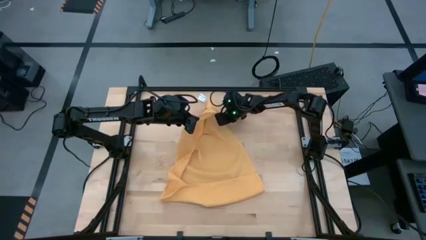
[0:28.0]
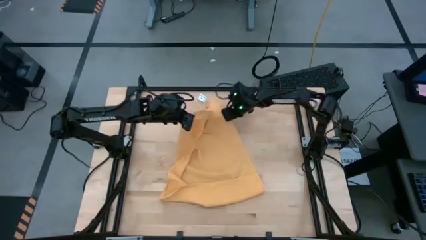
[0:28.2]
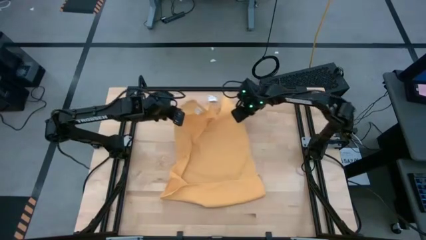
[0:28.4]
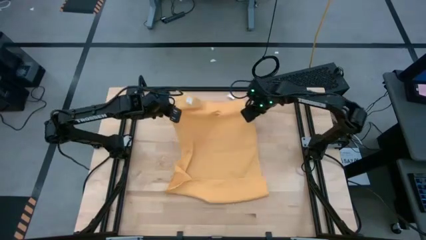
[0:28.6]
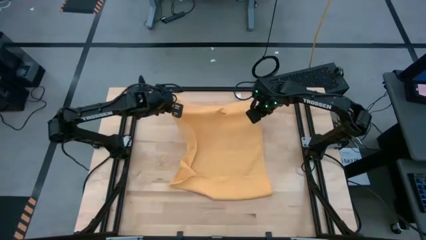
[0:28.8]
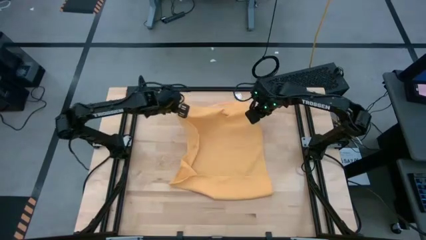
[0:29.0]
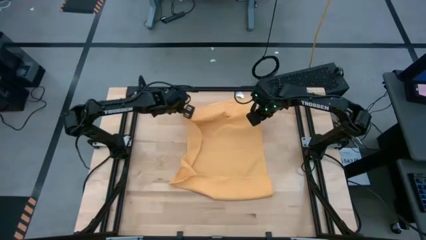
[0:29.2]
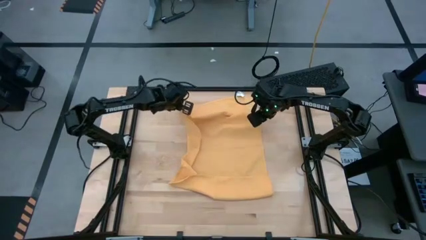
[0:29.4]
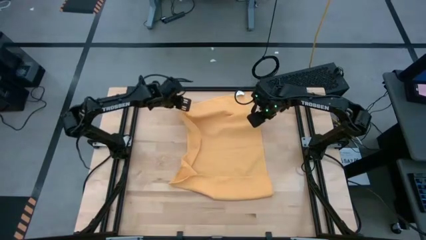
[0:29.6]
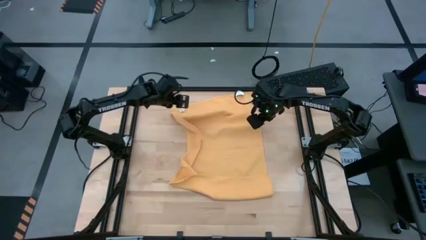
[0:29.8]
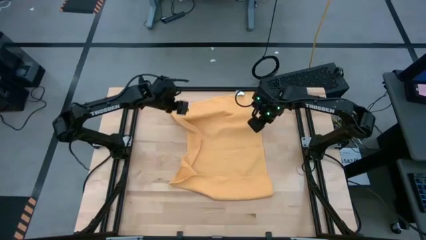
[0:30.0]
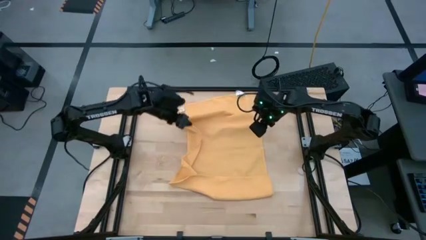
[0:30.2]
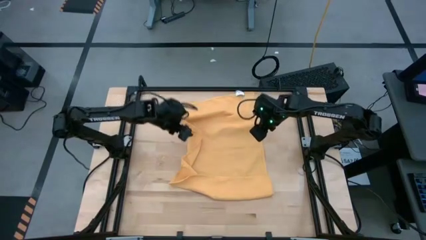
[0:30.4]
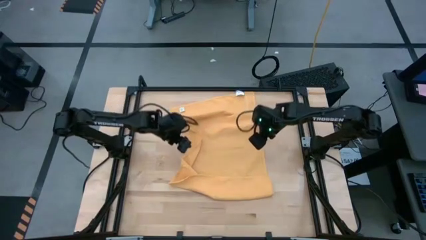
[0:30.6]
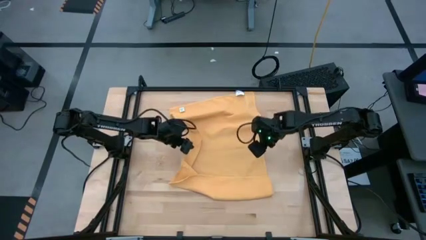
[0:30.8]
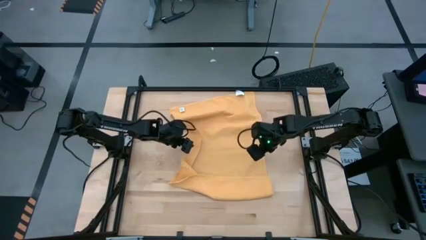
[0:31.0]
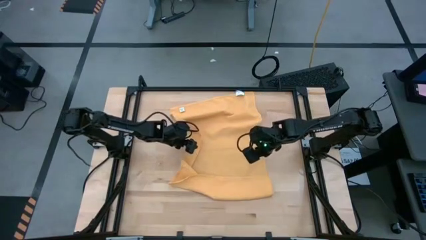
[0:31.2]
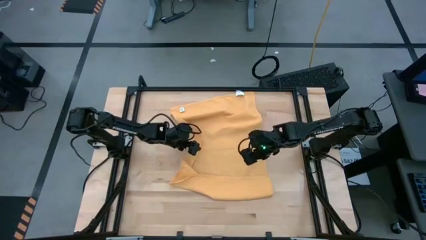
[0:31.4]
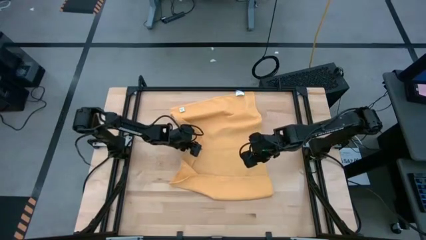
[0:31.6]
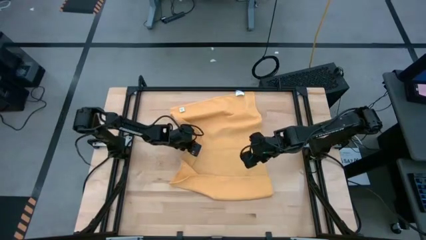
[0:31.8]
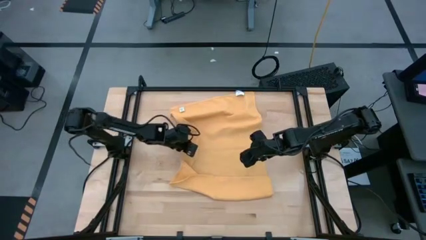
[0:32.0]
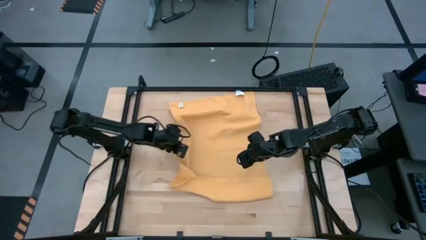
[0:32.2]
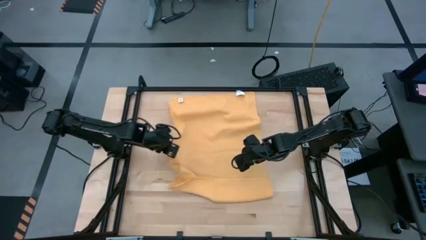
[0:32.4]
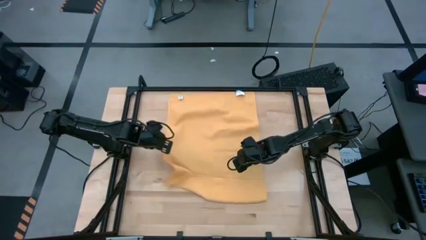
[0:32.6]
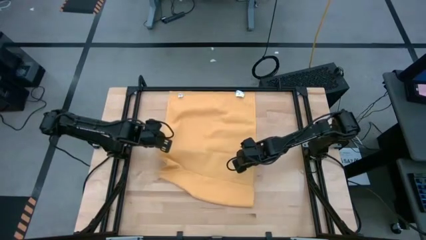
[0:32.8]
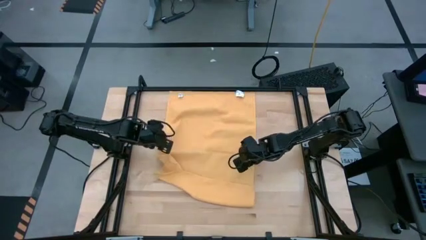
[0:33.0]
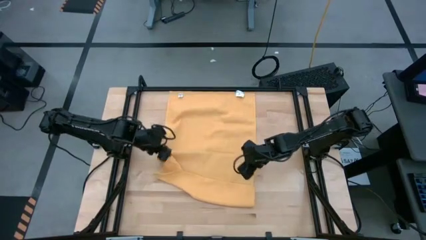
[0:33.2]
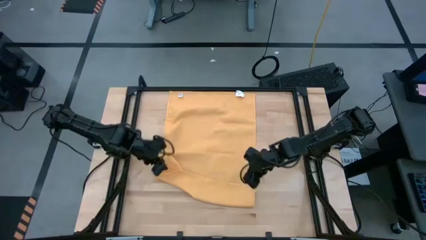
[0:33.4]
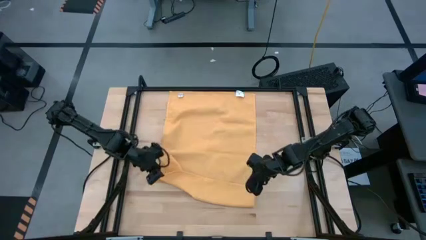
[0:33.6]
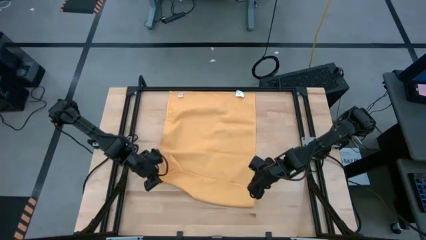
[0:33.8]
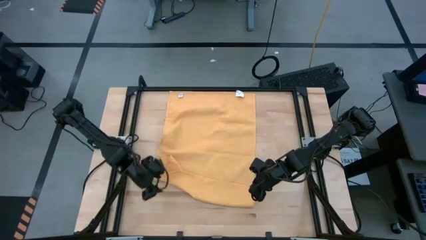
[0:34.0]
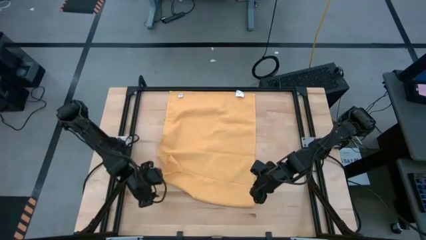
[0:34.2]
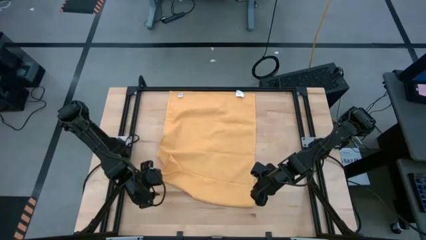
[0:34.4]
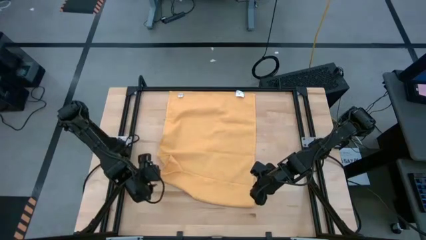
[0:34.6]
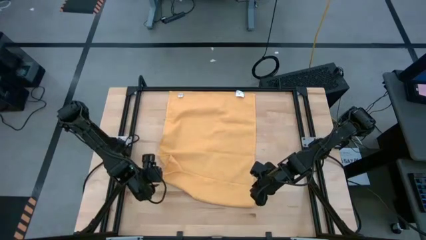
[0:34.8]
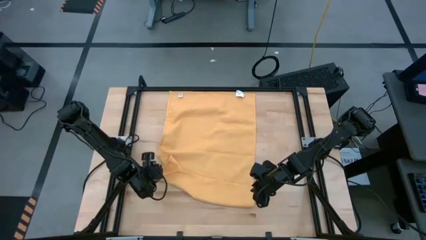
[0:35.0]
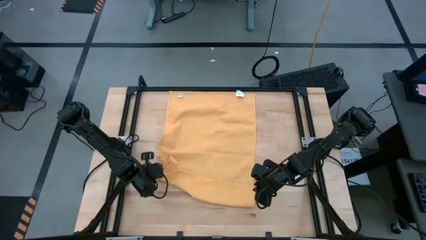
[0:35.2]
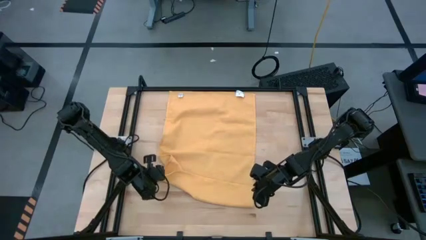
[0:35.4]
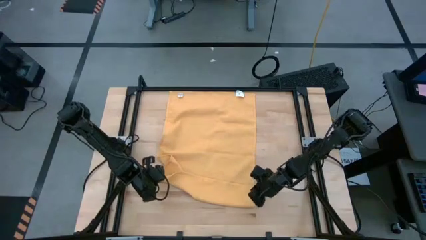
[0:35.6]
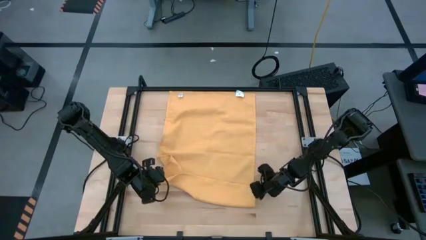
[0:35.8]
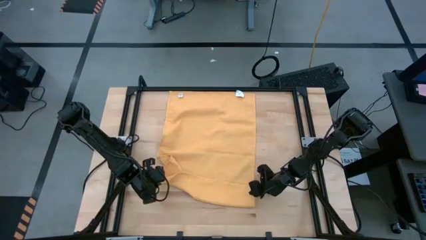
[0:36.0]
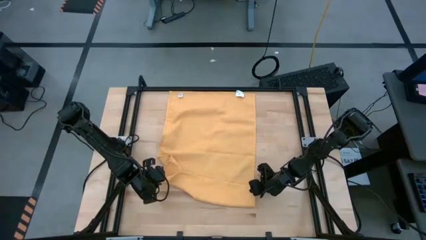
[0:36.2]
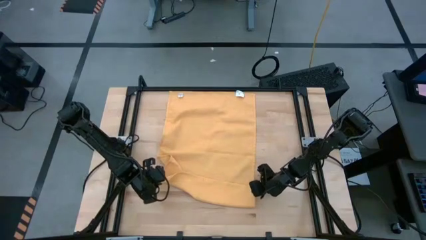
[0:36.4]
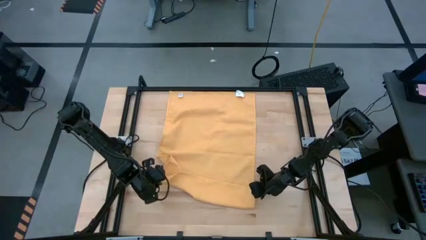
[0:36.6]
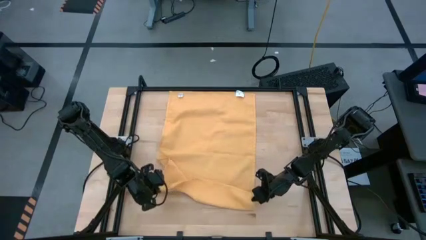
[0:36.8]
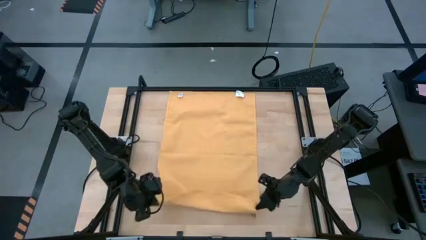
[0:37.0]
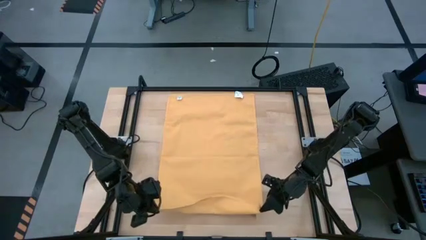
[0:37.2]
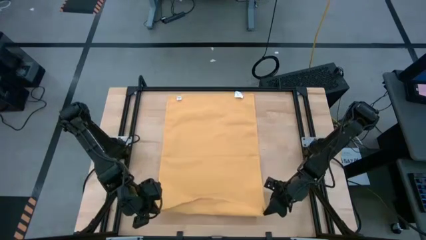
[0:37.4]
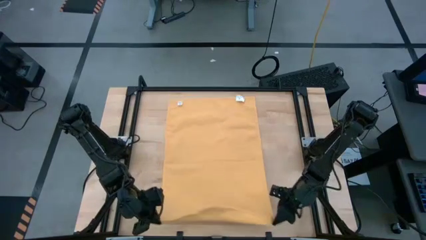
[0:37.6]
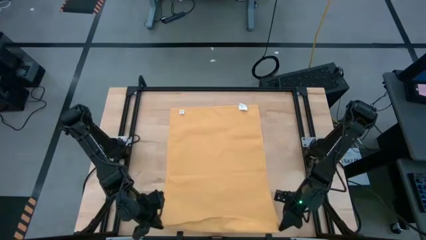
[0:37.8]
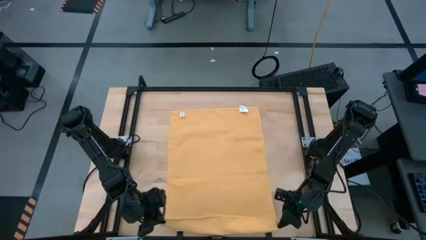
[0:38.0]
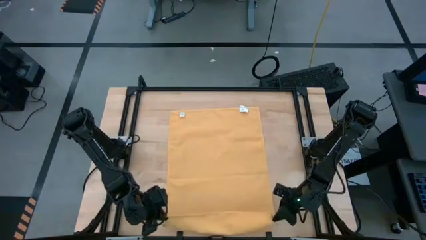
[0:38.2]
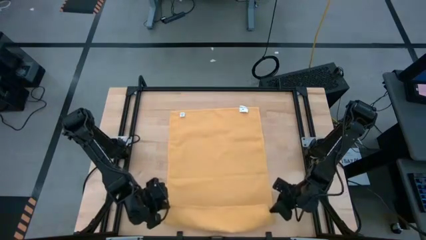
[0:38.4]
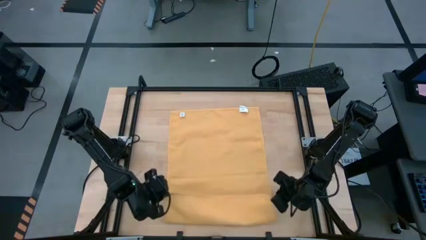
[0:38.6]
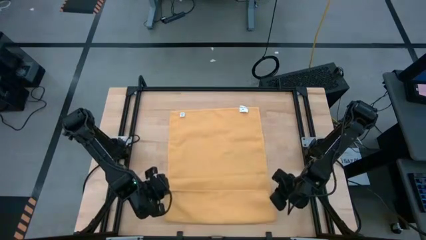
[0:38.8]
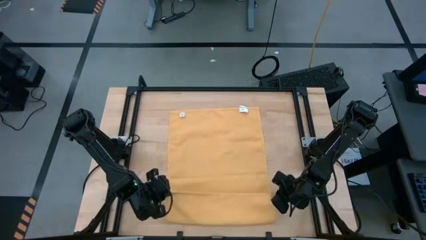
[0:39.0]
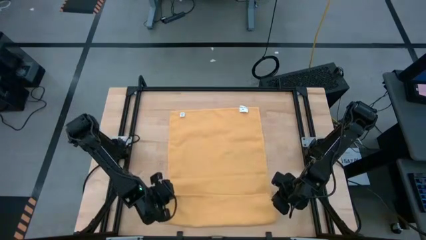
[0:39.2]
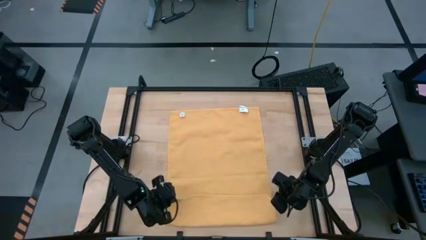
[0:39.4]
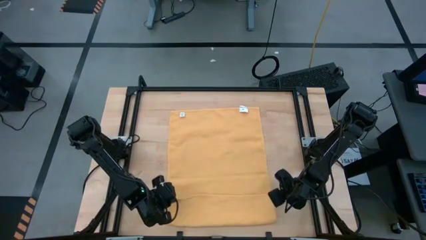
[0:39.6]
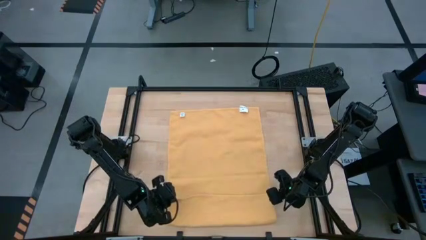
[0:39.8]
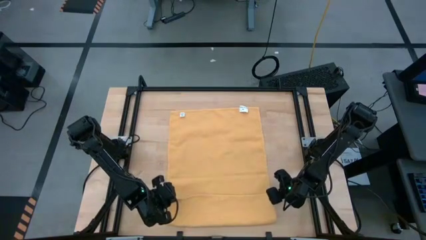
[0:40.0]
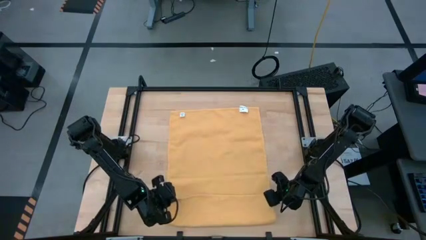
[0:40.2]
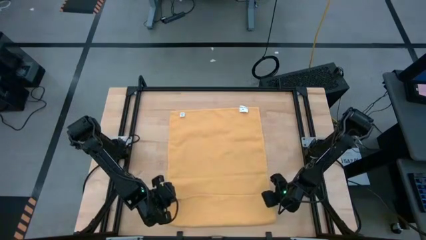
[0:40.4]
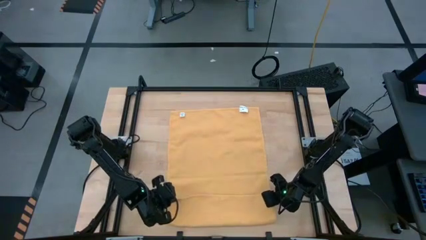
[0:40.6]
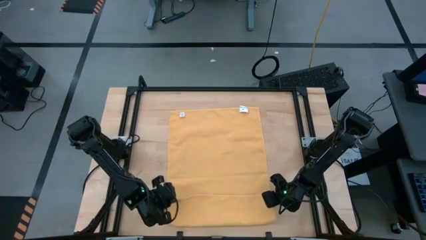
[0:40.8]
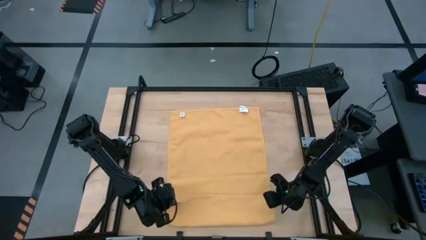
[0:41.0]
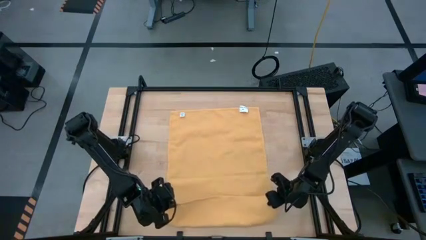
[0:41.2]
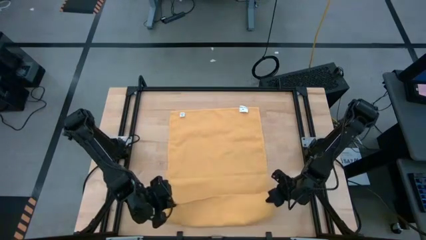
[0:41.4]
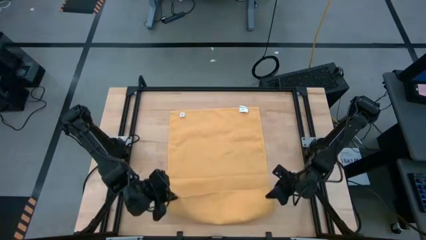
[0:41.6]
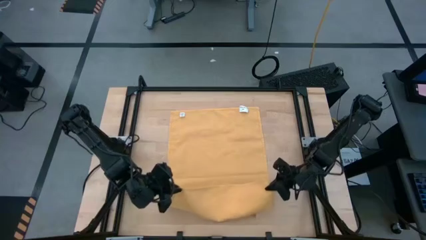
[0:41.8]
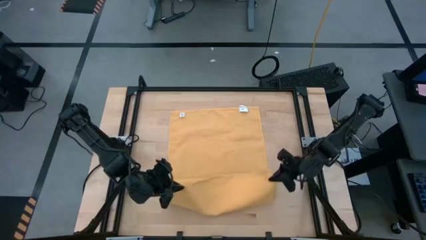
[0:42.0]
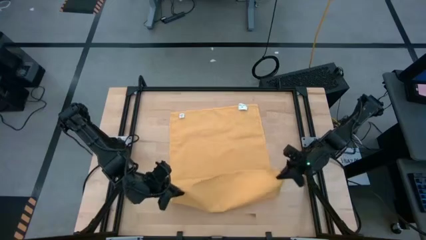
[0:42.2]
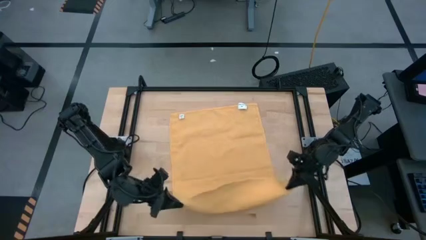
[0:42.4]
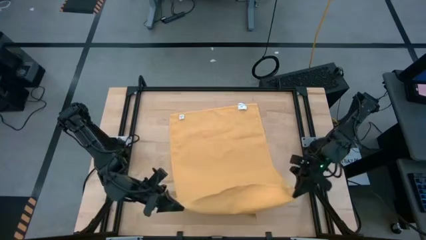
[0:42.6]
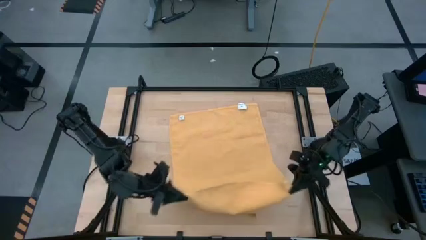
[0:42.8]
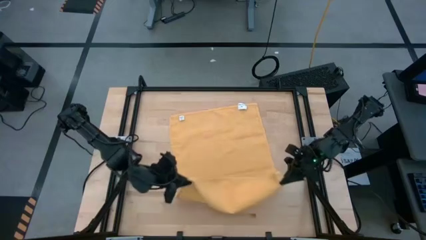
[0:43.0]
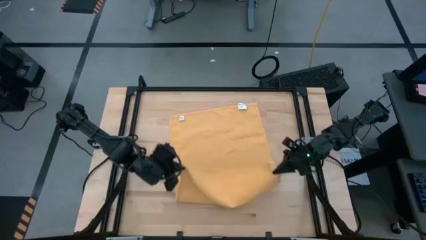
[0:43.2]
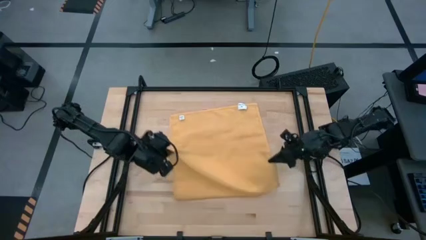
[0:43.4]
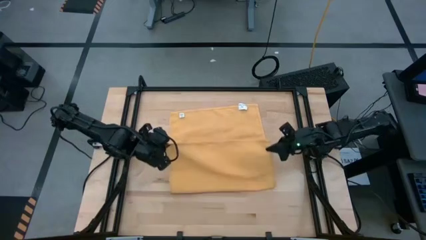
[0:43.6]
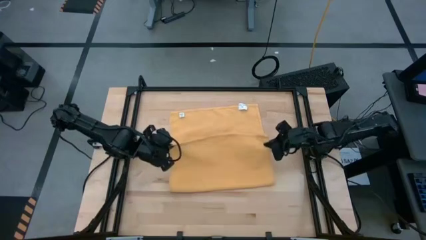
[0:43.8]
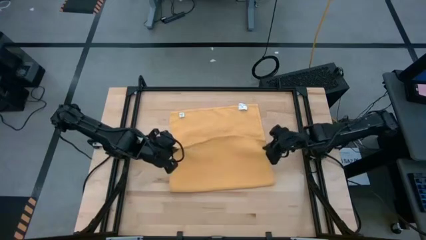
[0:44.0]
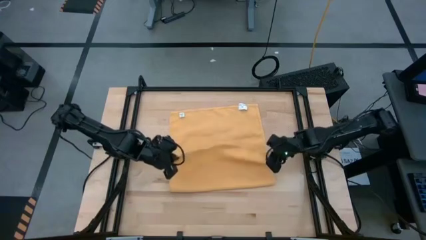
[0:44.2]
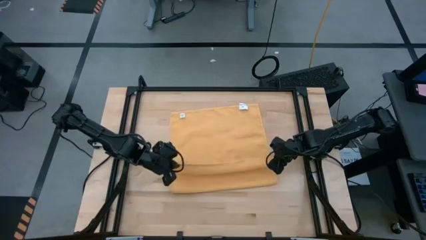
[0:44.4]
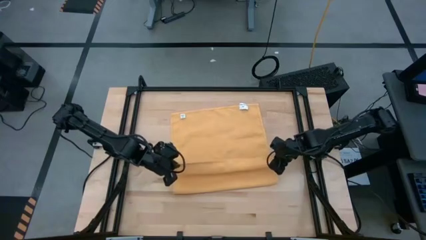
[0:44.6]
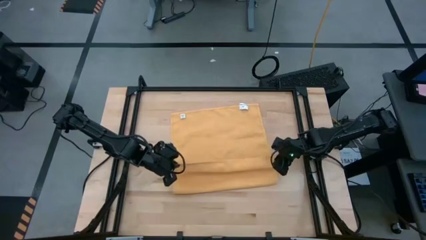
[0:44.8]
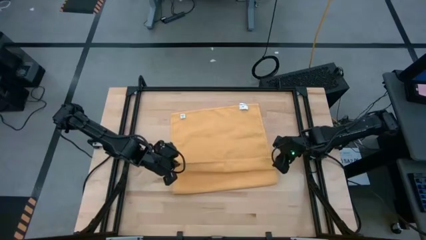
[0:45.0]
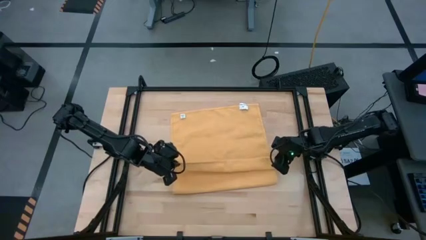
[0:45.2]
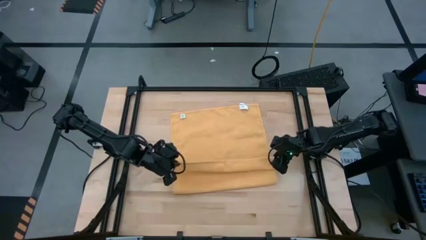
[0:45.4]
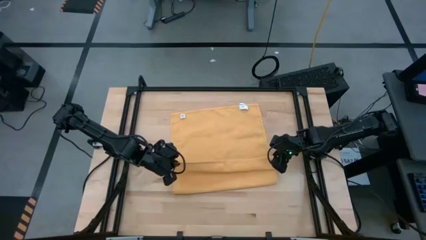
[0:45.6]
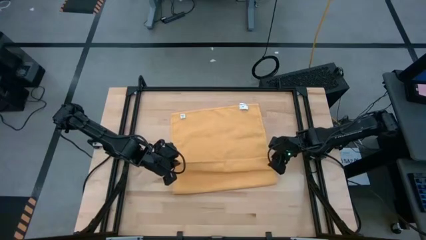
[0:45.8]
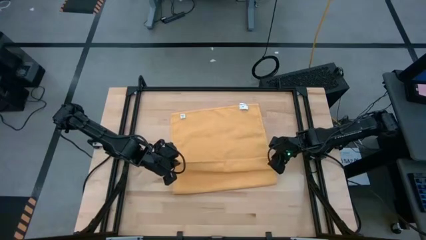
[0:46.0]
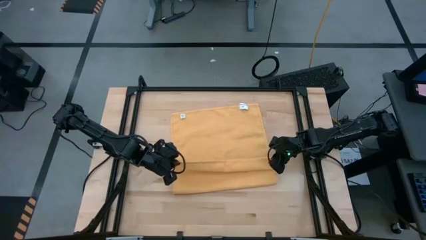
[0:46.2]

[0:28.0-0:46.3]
Task: Roll towel
Roll the yellow towel
